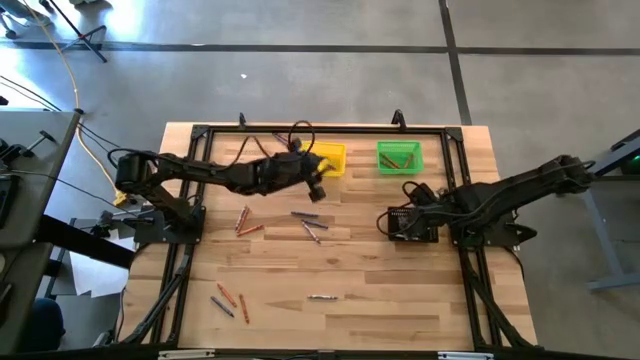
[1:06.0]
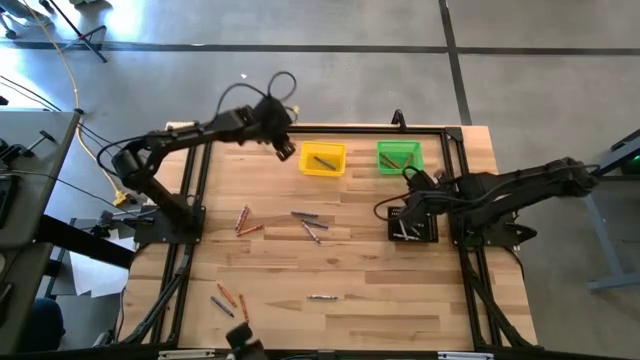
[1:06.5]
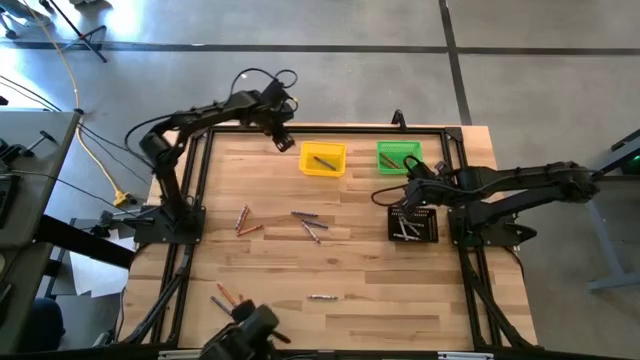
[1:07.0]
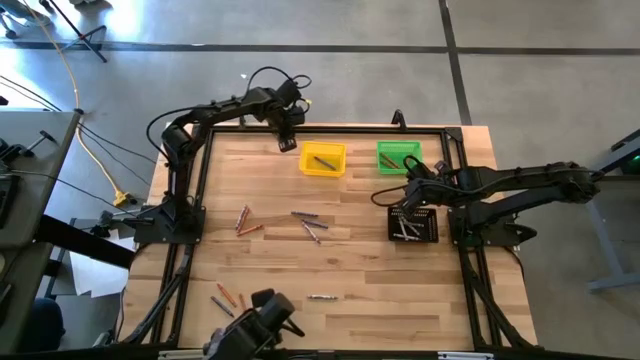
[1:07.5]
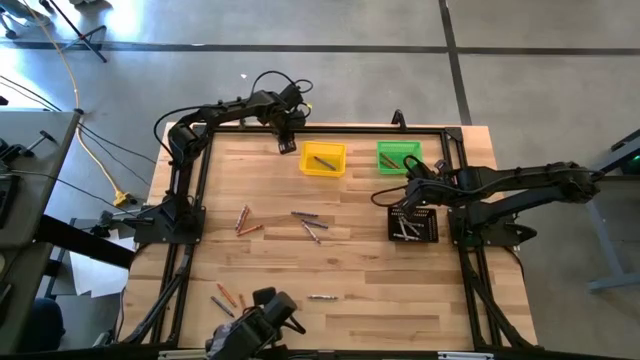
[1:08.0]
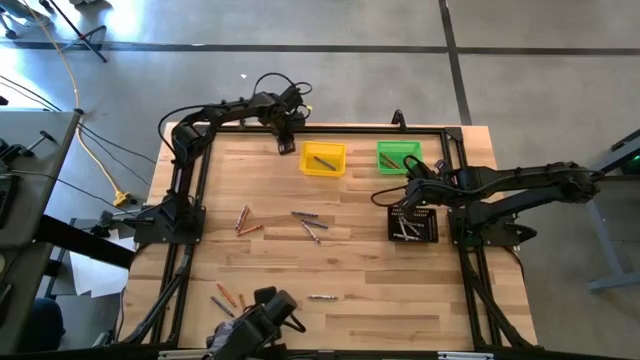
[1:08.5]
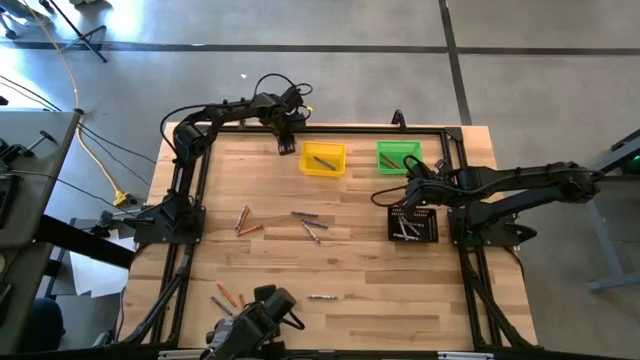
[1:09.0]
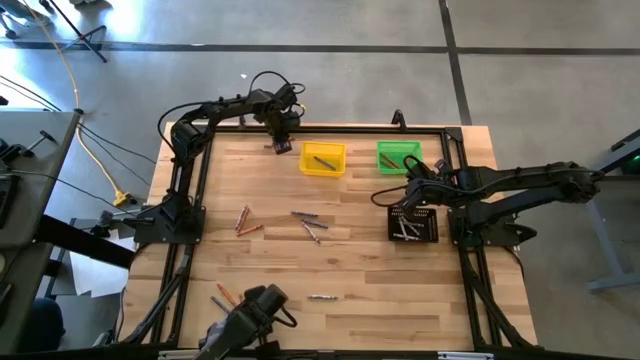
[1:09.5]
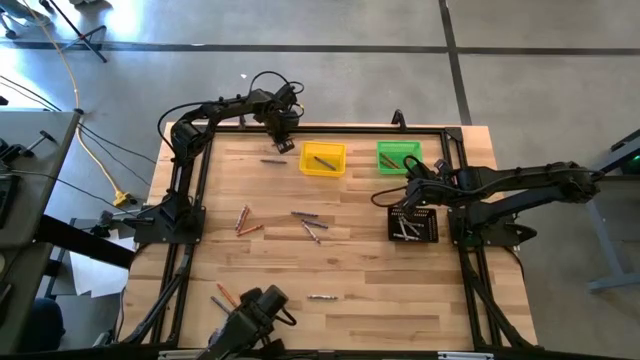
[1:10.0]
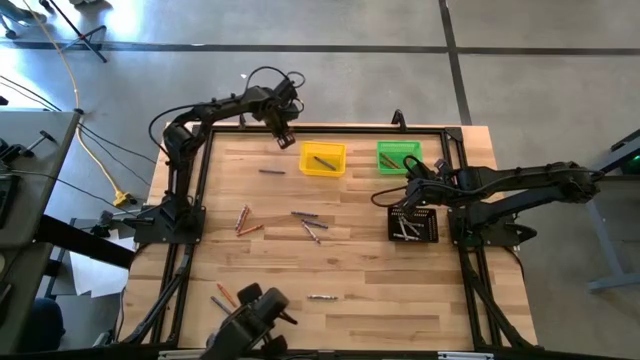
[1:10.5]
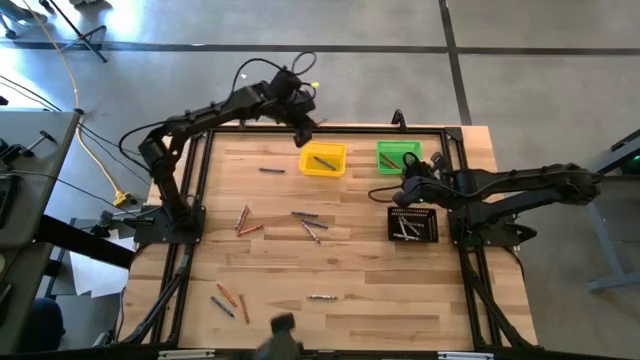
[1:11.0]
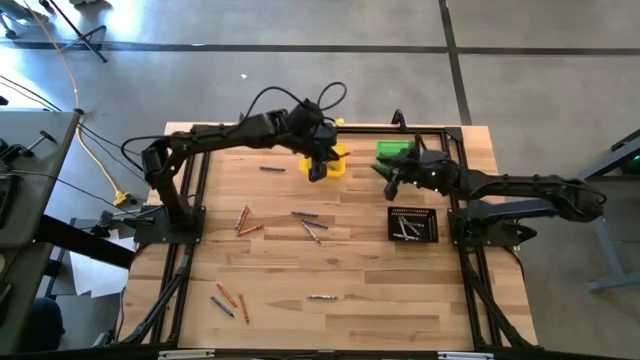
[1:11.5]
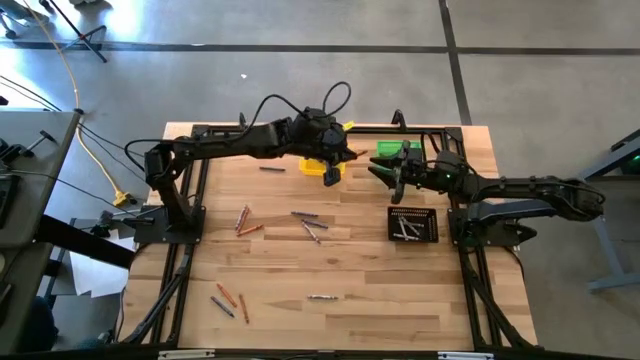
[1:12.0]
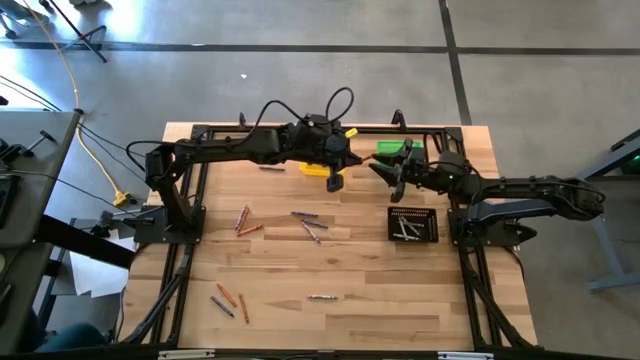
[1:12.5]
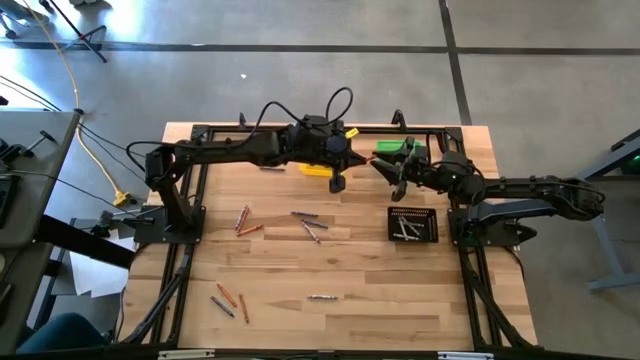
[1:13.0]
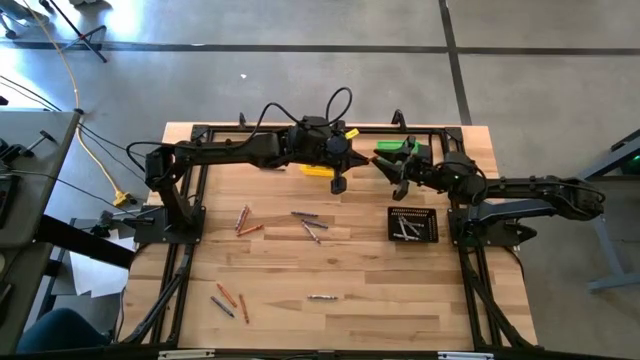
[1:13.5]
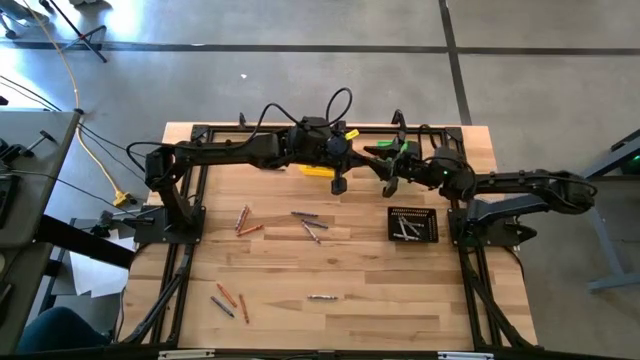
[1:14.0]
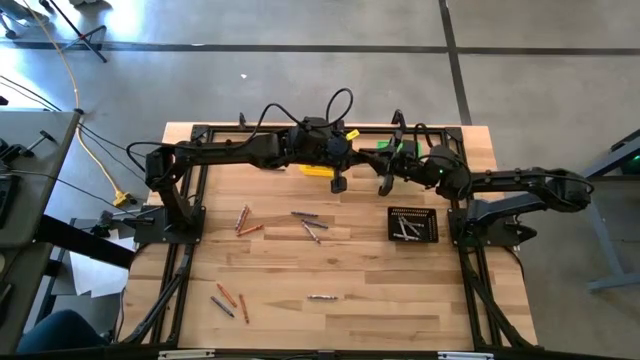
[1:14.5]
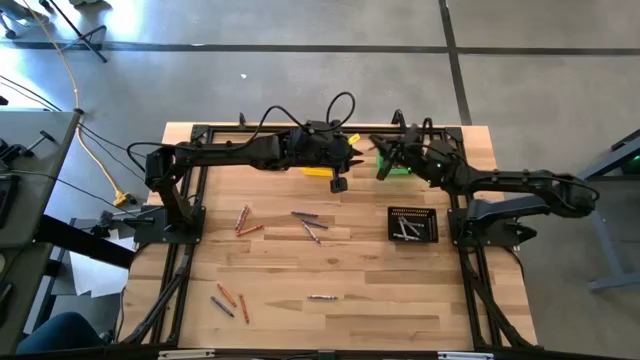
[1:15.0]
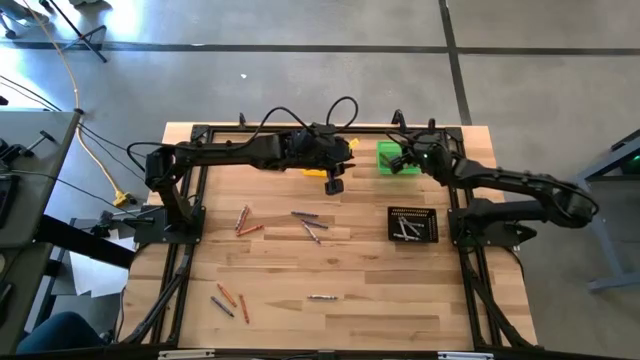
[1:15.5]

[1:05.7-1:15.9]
Task: Sort crayons
Put the orange crayon into the green bin

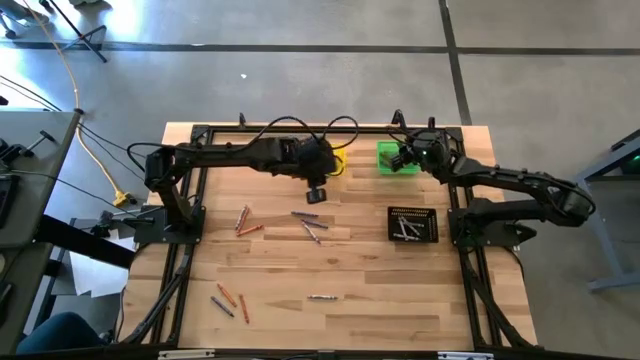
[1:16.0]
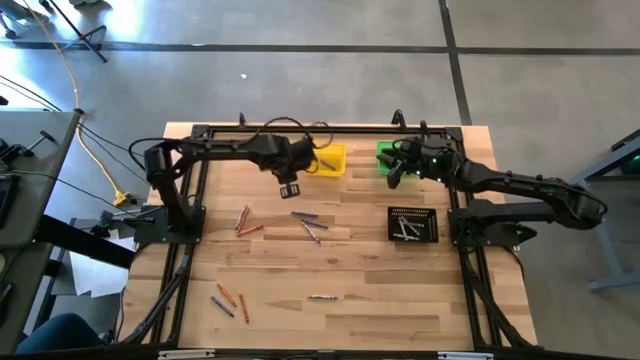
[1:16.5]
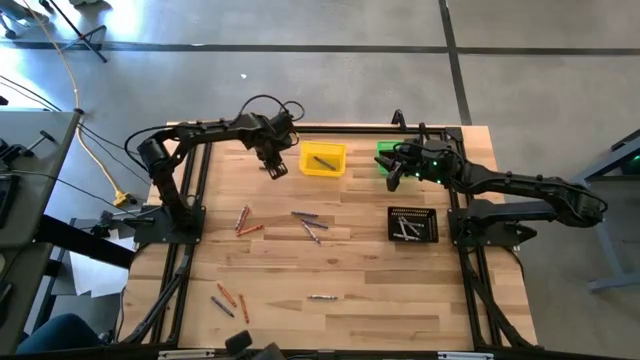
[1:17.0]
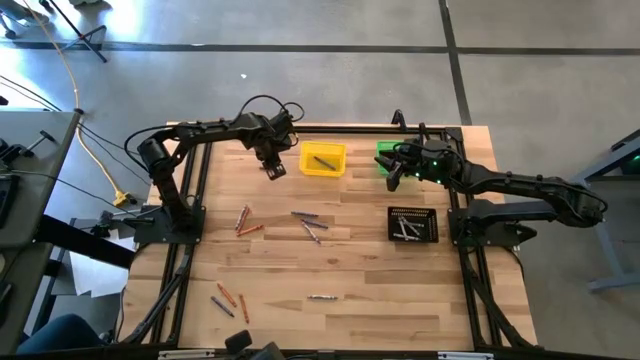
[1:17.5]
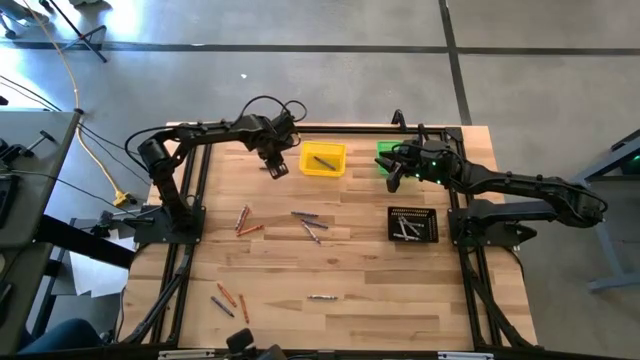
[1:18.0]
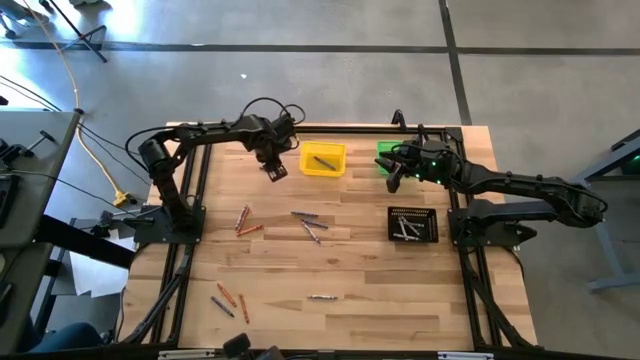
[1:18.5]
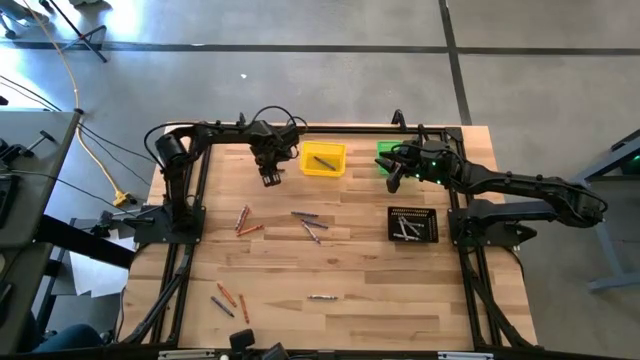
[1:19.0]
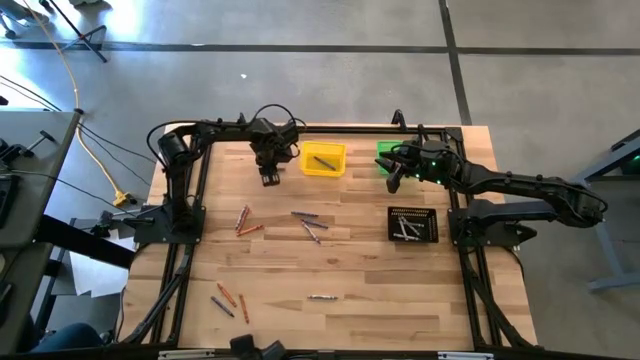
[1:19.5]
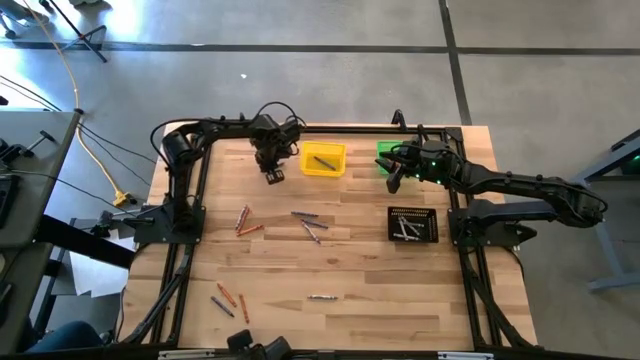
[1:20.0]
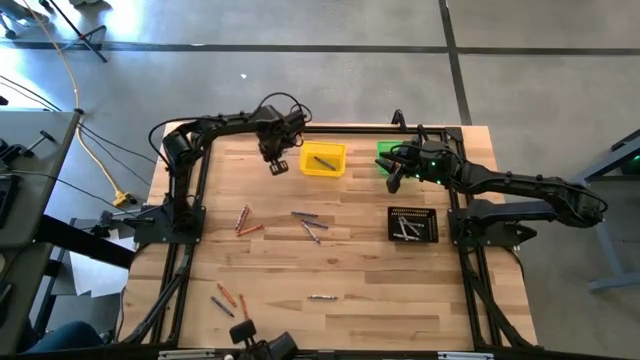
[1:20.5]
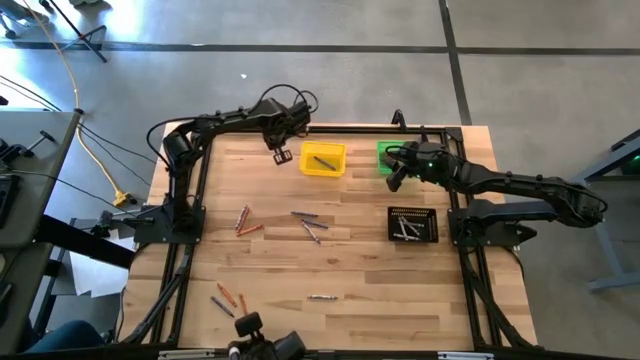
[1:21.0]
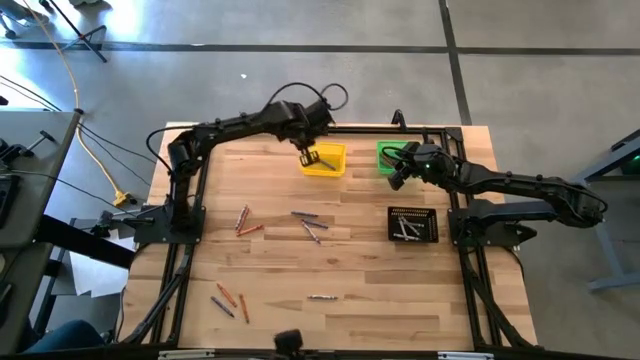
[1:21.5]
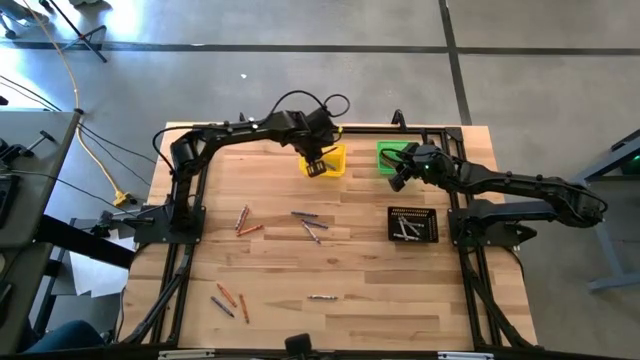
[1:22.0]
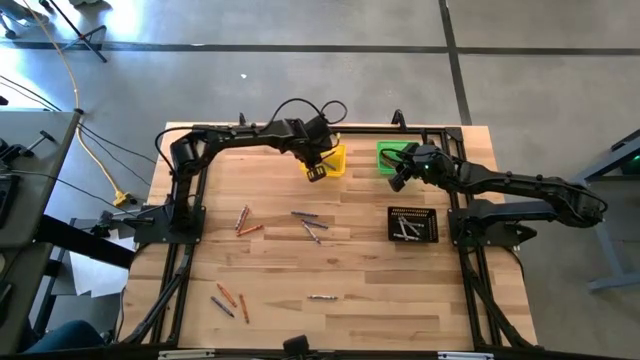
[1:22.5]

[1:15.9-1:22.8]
Put the blue crayon into the yellow bin

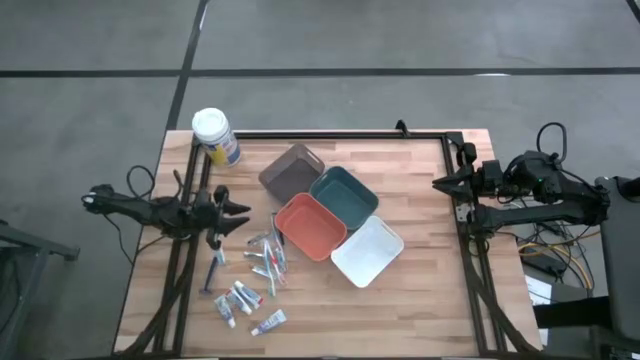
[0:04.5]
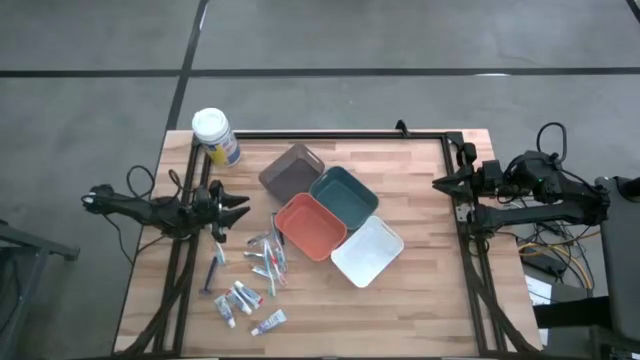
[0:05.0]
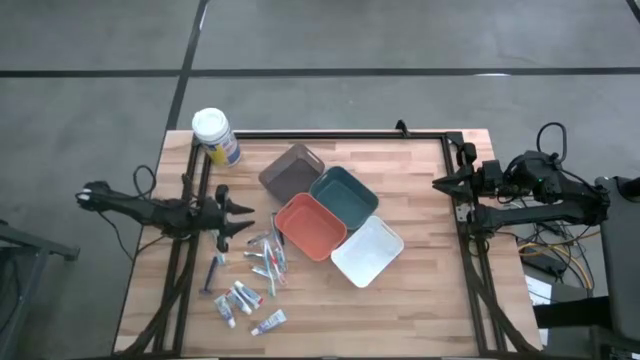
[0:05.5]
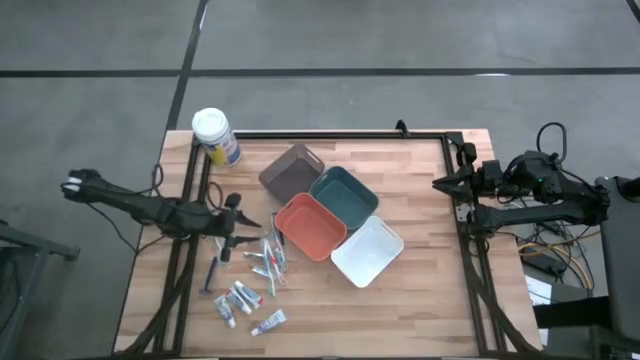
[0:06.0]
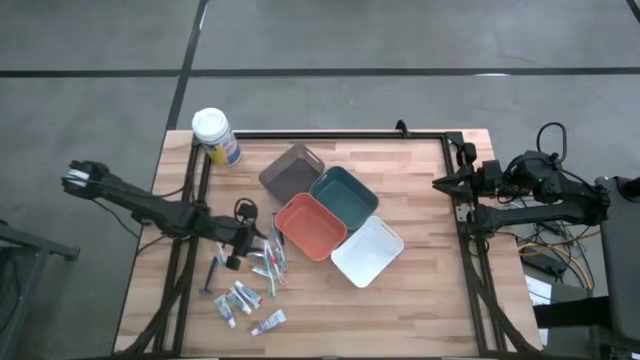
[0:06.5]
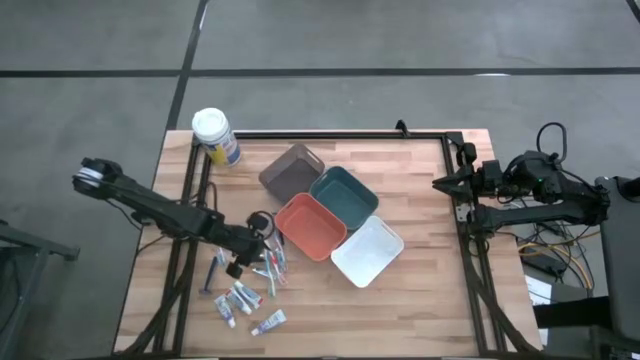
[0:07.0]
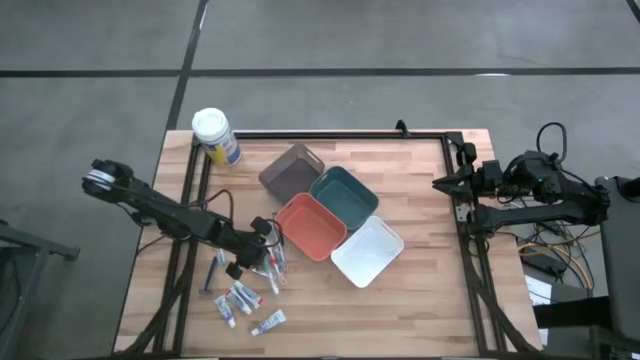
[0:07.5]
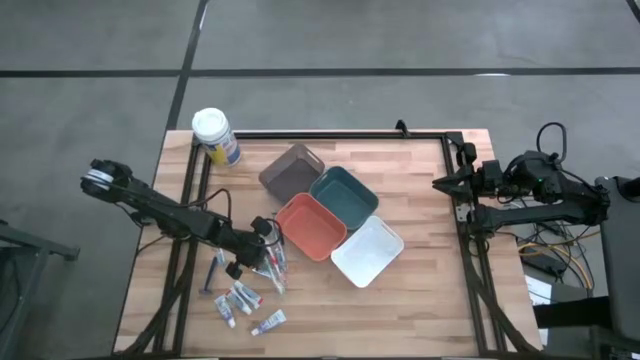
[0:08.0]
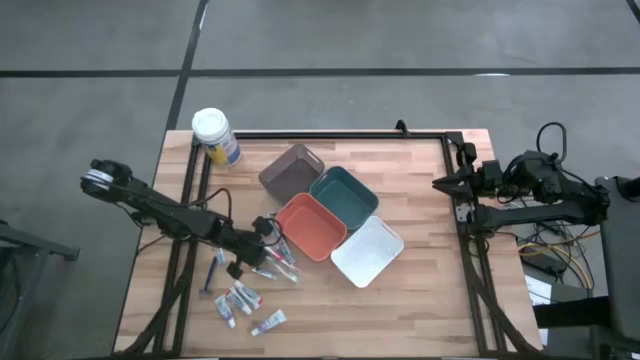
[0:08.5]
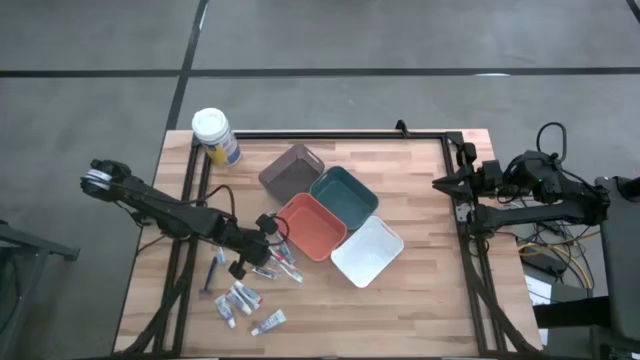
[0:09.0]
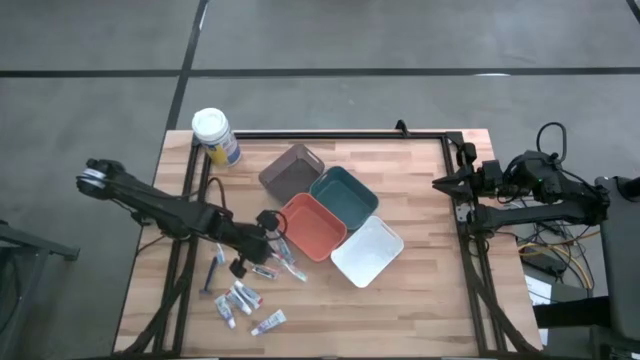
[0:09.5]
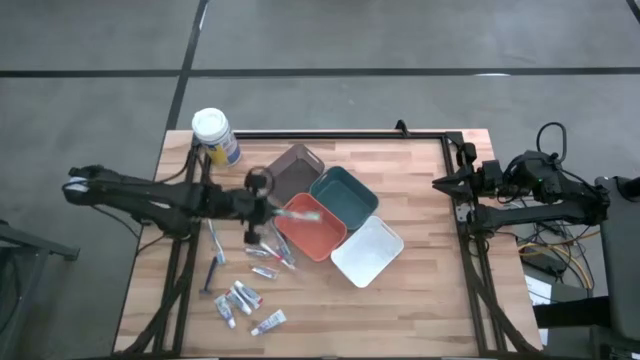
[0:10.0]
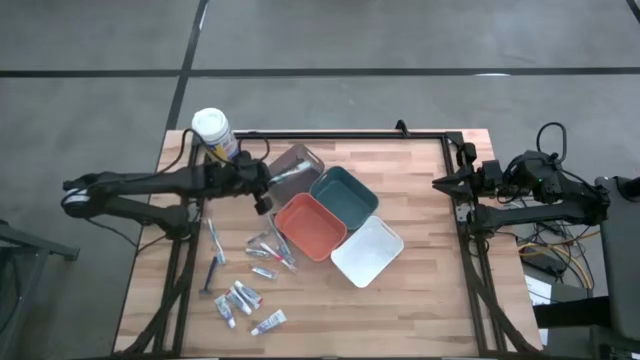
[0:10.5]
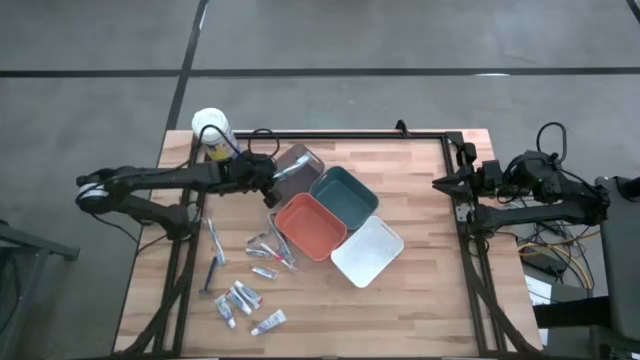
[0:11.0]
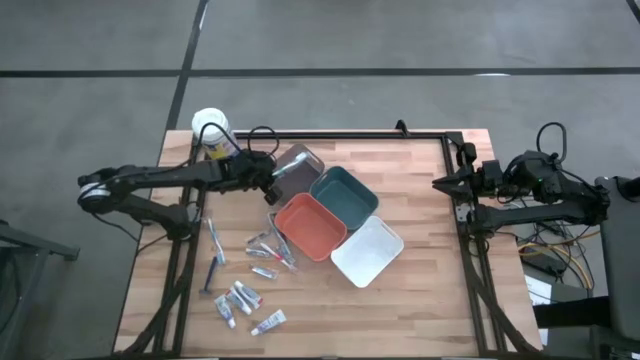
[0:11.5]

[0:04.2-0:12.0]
Task: Pick & Place Travel size toiletries
Put the light blue toothbrush into the black bin
